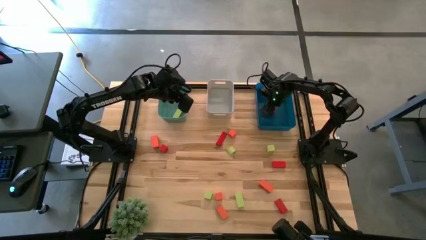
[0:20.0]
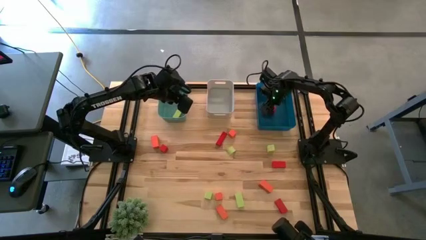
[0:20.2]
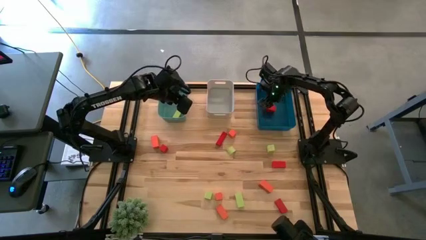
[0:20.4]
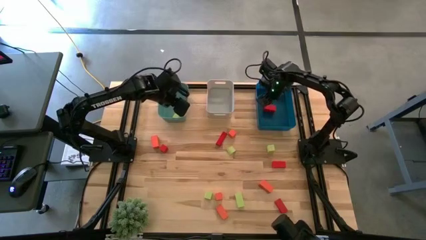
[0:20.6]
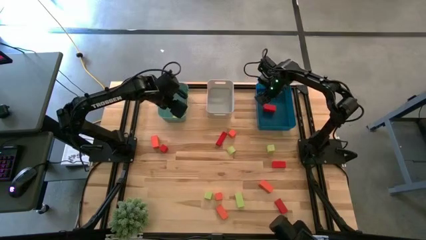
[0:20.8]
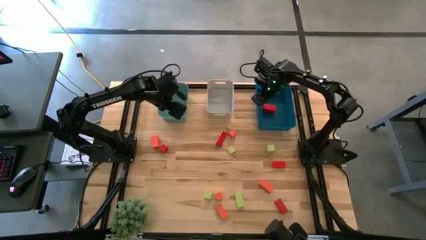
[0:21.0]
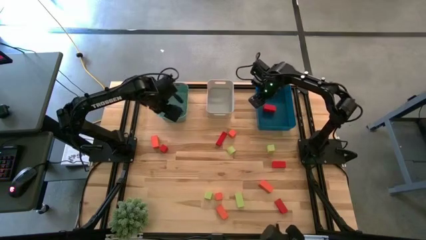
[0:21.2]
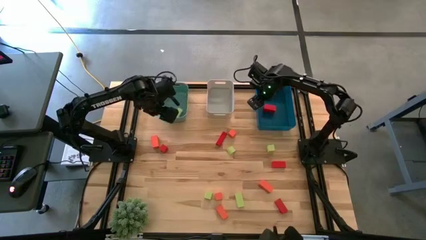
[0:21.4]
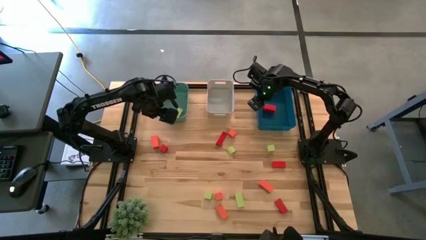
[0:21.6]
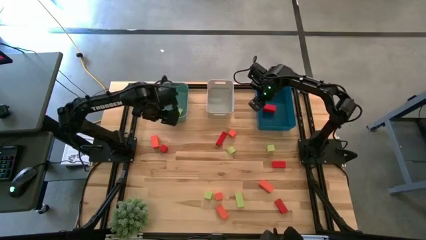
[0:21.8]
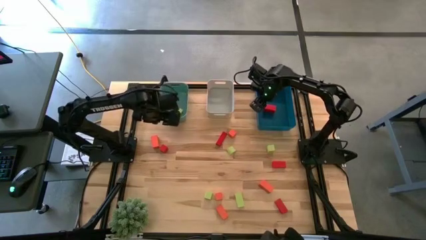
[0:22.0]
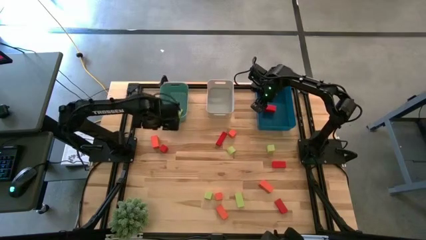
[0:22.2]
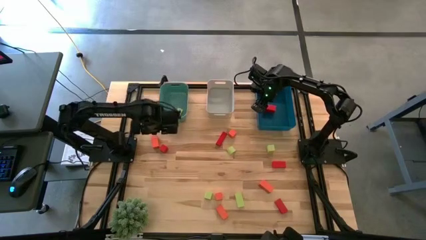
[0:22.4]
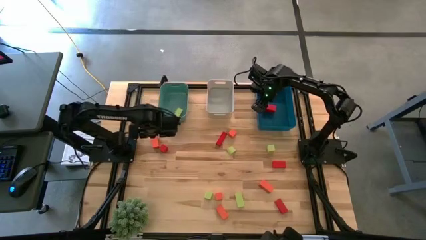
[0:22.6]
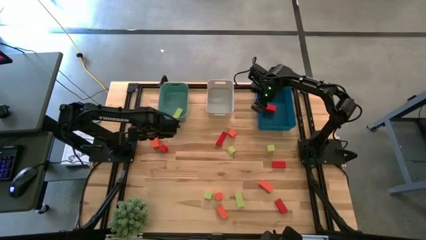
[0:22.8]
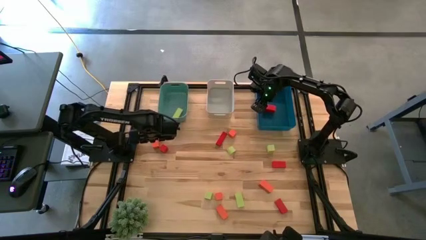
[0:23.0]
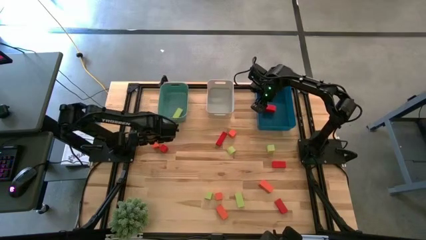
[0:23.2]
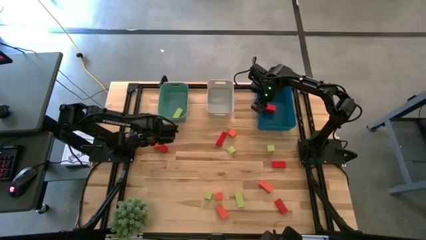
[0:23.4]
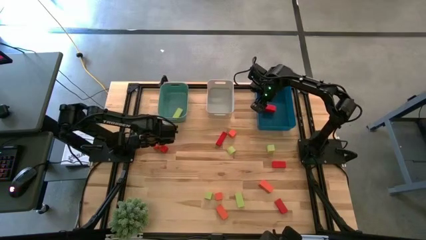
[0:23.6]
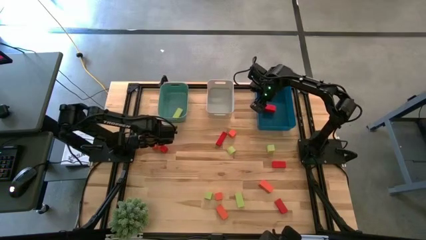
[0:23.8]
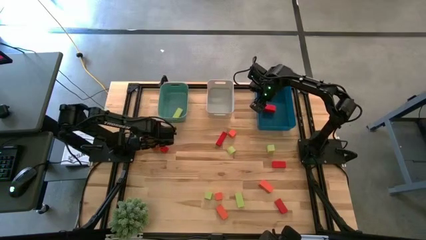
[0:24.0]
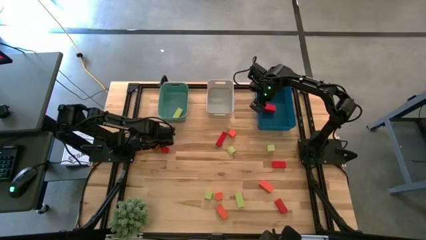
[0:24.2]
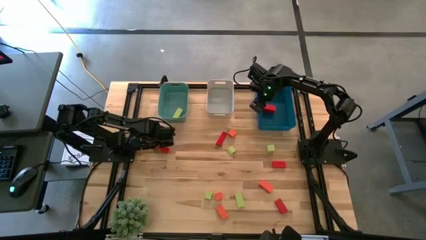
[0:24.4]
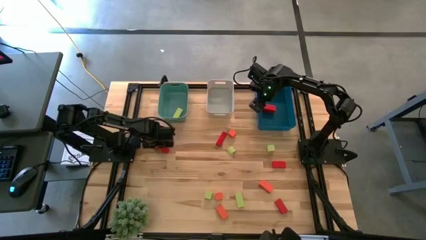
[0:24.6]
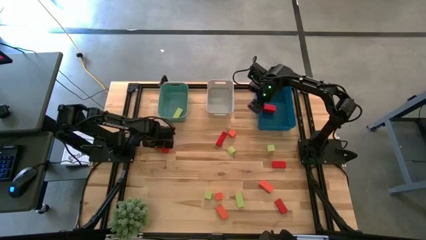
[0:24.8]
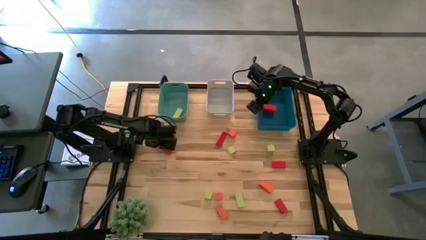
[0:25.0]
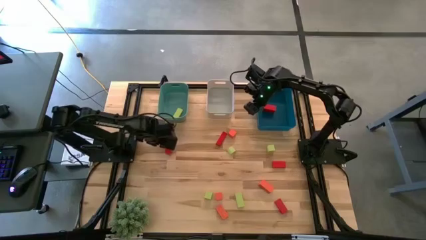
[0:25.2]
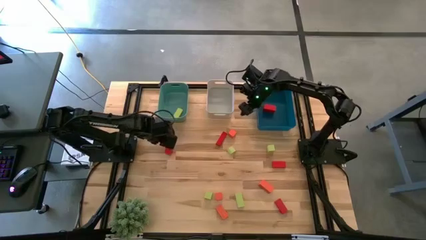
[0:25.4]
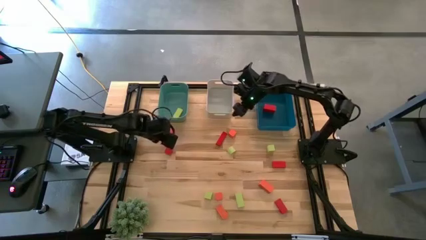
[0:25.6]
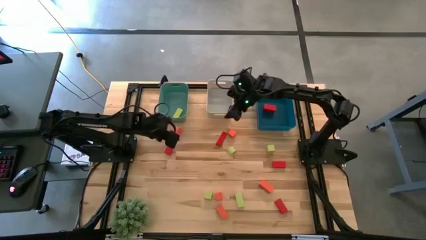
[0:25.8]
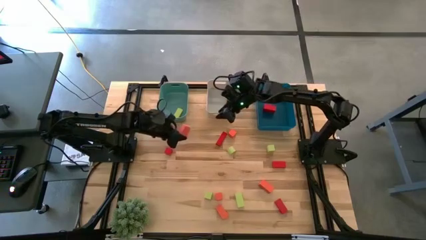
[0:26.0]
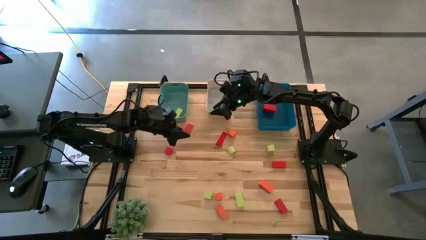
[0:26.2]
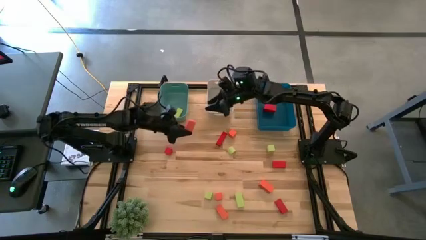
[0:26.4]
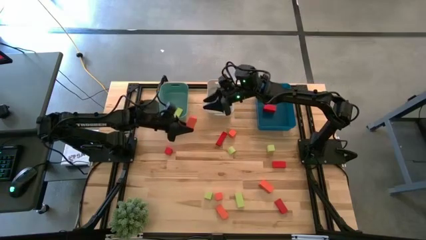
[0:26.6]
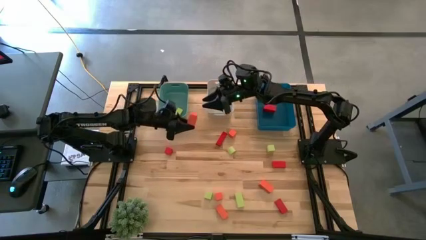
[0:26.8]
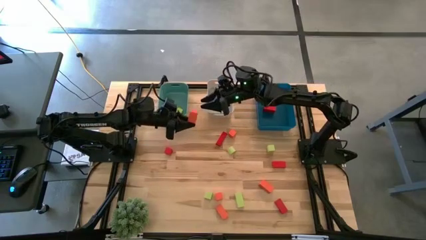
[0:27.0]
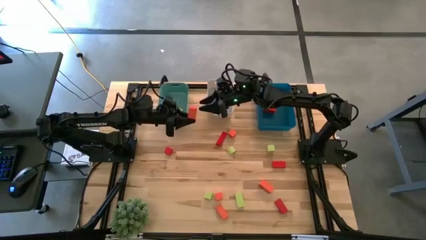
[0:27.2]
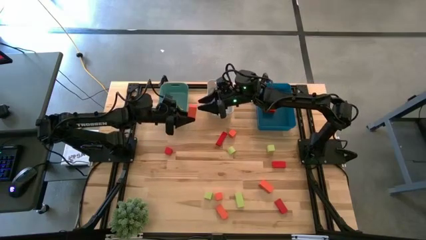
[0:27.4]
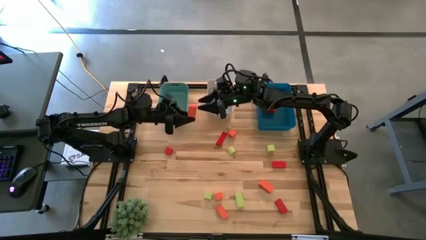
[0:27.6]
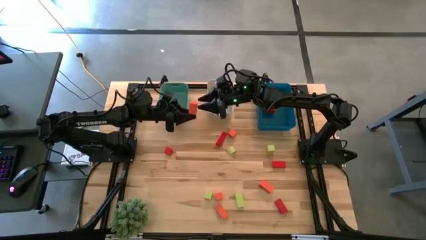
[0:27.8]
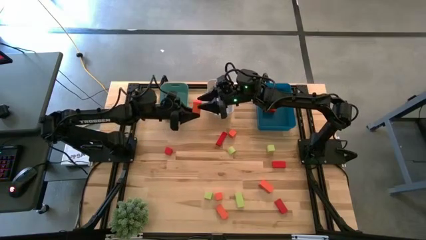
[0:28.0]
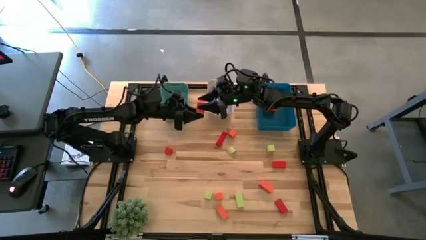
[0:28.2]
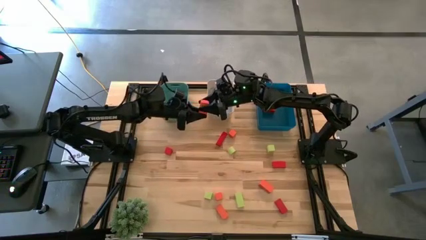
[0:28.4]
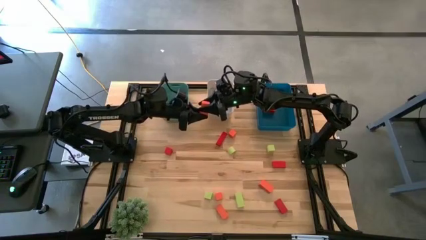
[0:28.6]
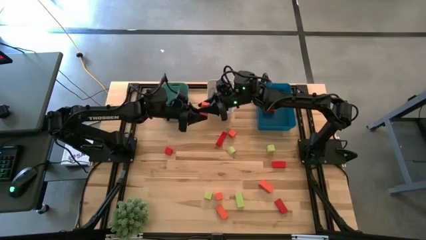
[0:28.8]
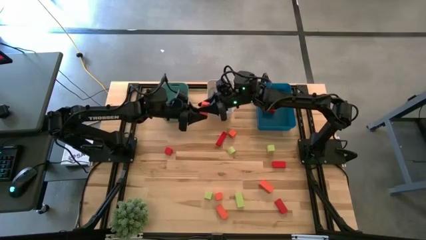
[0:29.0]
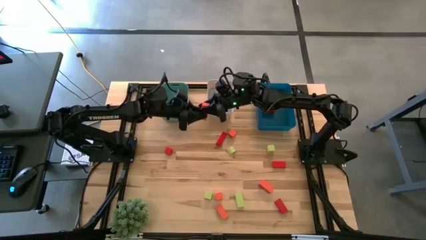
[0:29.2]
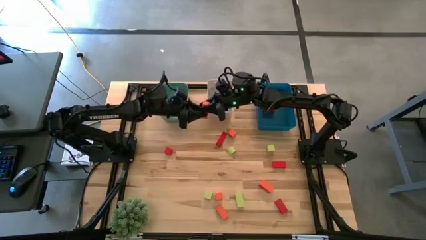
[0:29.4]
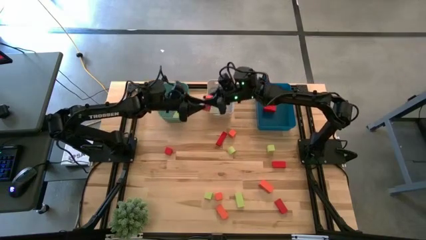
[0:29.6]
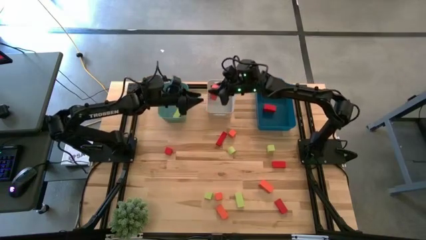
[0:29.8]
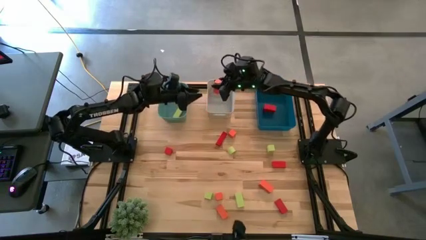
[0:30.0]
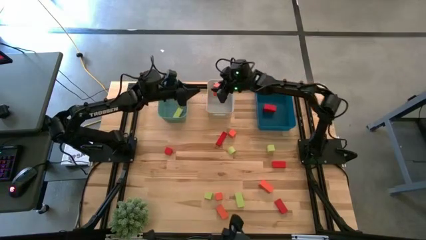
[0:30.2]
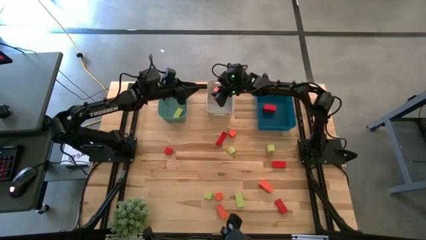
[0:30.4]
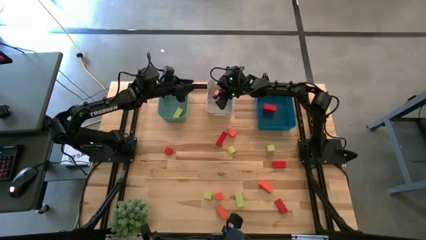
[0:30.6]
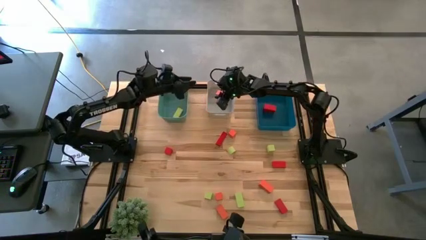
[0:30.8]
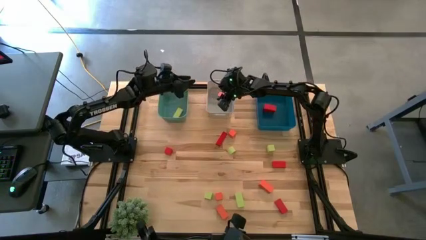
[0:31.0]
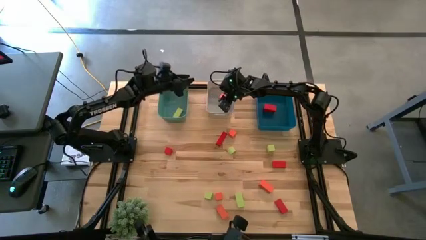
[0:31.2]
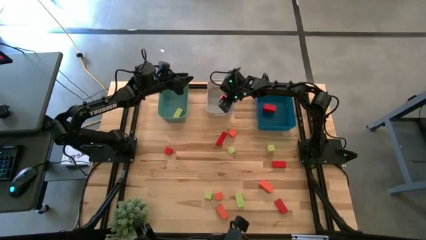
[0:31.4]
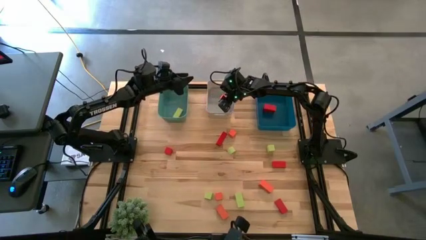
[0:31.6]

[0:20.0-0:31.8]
Task: Sort & place blocks by color
Put the orange block into the gray bin

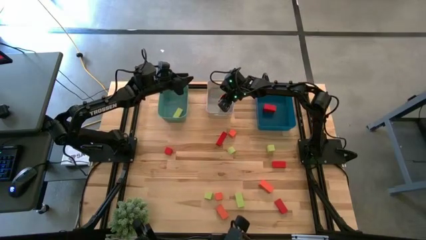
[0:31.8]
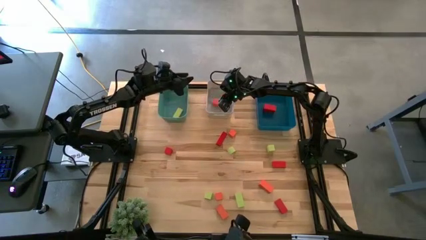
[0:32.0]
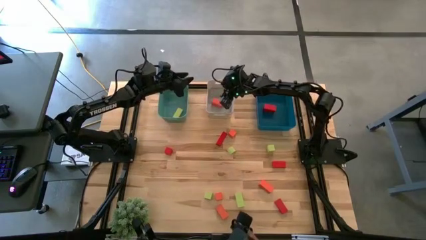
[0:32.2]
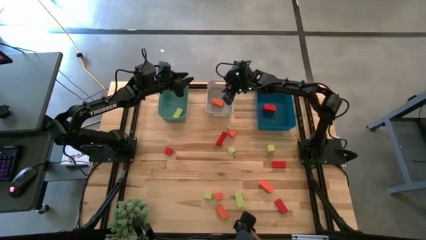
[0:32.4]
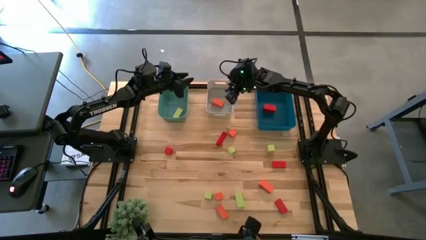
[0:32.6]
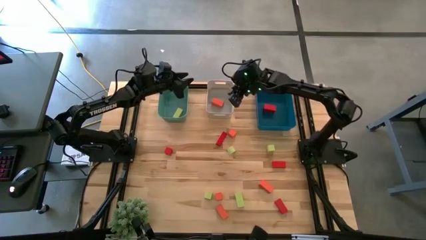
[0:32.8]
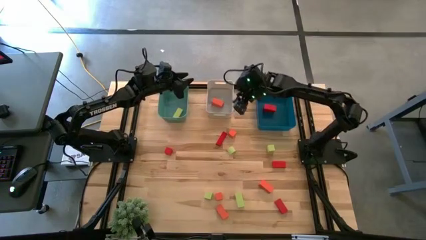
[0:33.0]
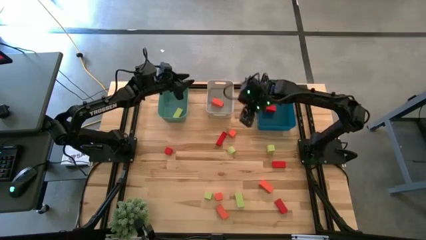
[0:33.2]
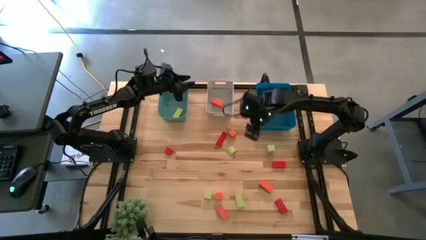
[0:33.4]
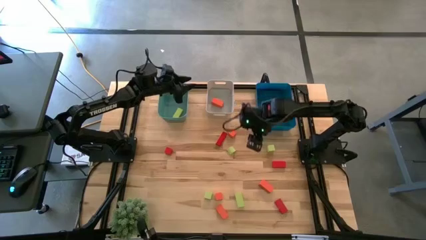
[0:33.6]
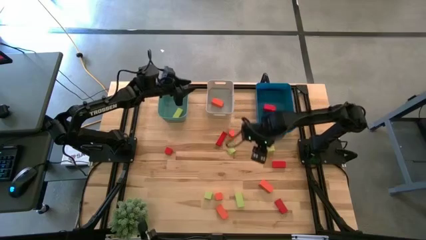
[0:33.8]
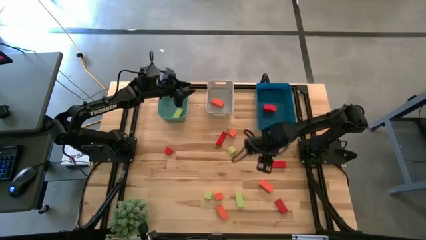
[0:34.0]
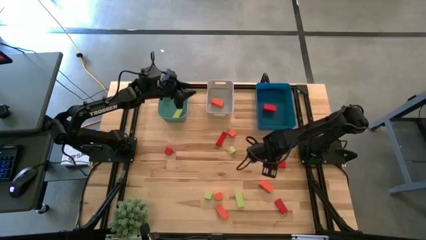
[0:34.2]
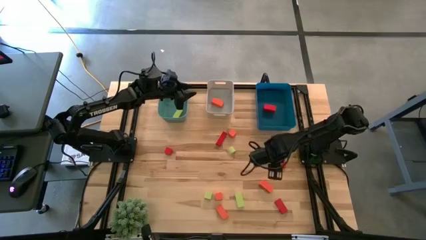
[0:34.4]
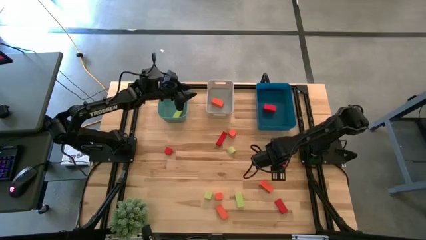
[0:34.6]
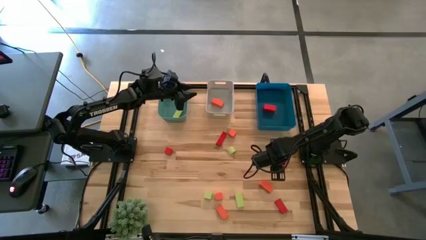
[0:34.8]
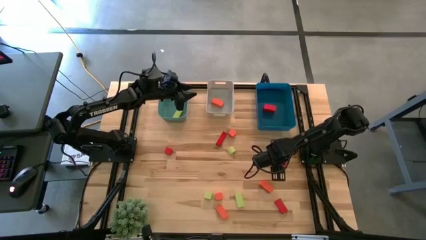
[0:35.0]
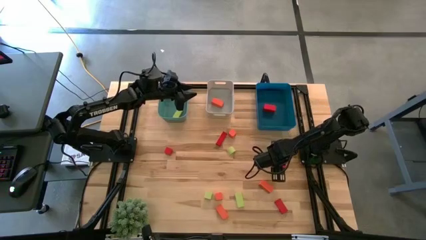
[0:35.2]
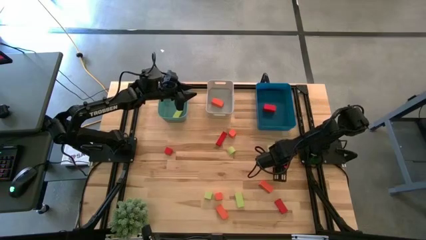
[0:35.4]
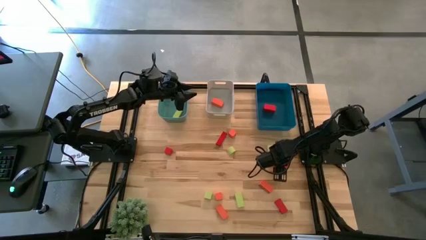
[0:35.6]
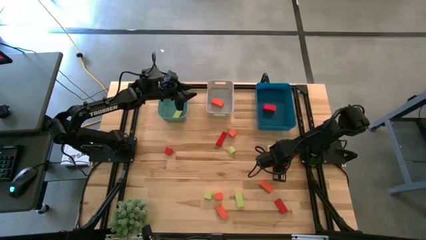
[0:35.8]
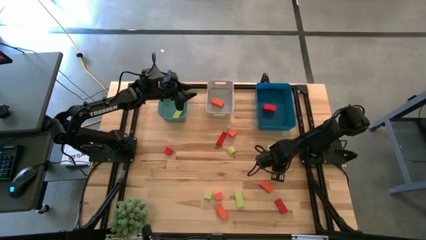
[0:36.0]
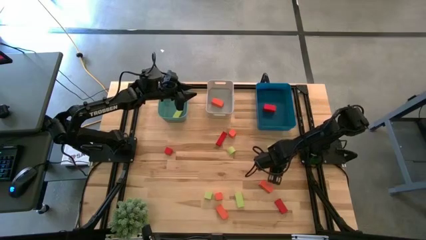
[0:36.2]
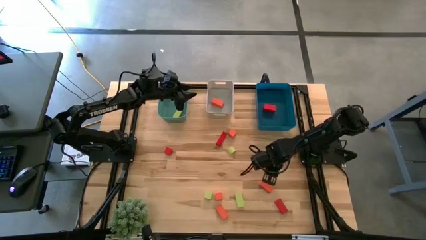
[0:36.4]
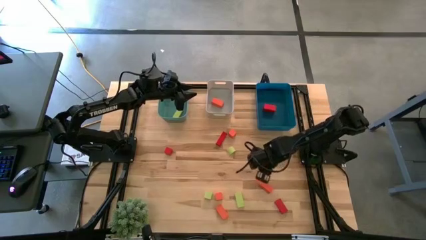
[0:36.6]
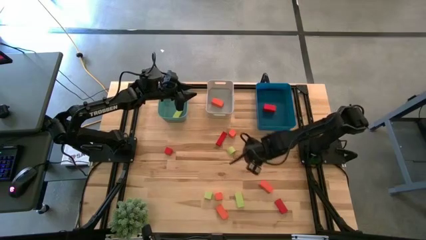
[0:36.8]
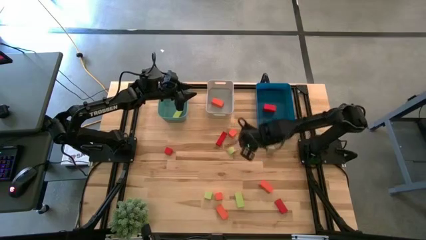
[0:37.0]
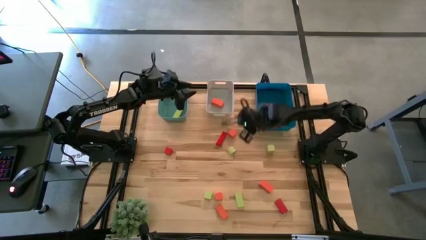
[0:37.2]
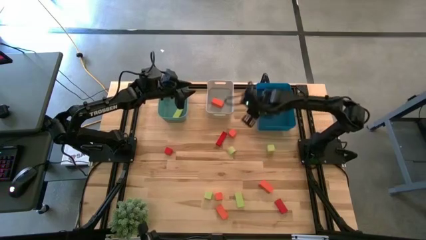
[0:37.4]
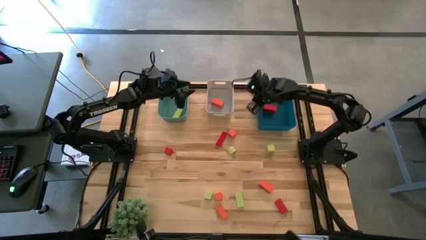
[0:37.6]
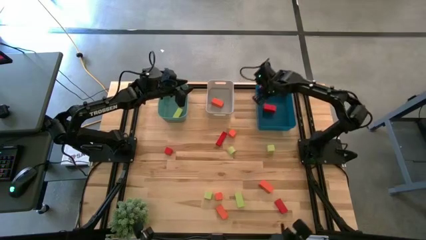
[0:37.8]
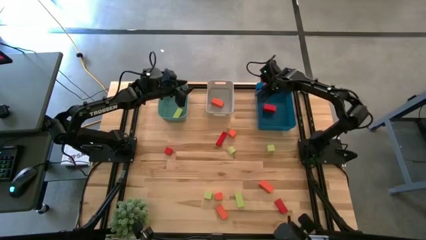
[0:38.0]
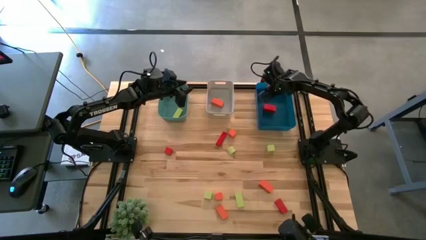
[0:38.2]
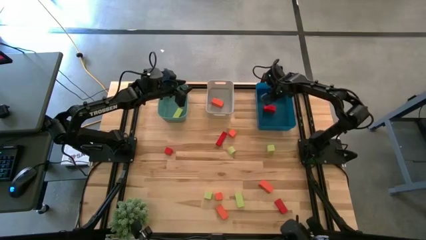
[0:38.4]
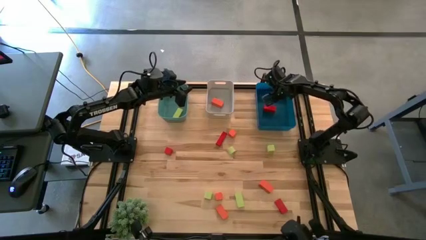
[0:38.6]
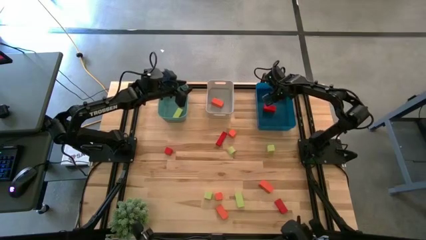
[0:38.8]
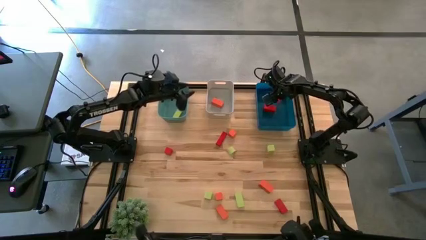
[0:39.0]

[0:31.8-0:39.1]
Put the red block into the blue bin
